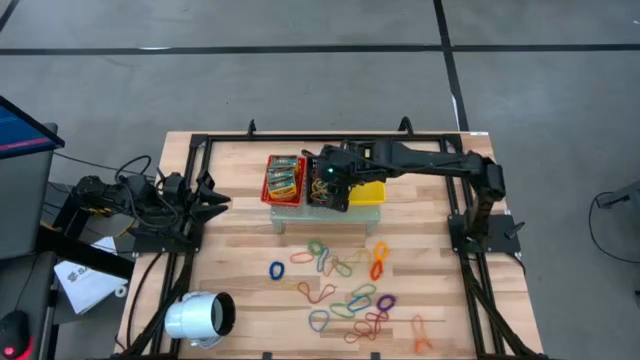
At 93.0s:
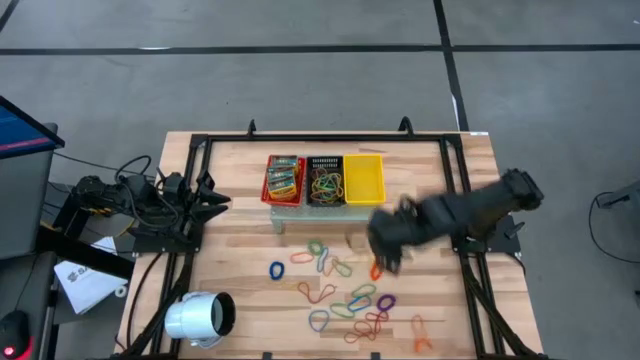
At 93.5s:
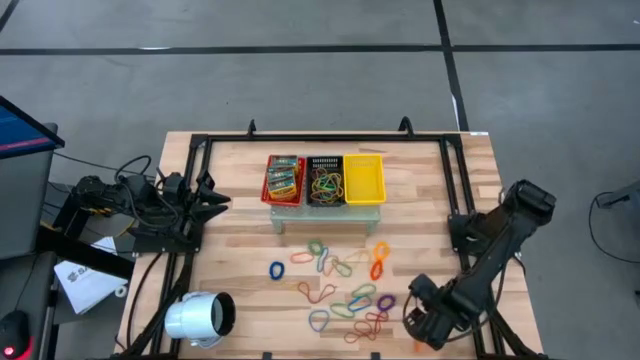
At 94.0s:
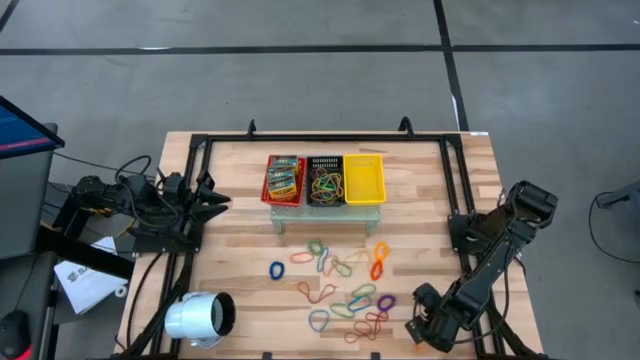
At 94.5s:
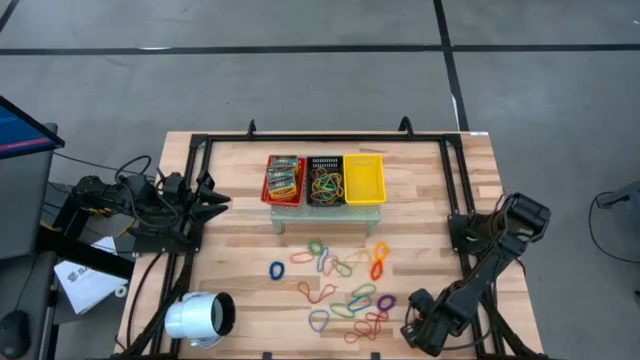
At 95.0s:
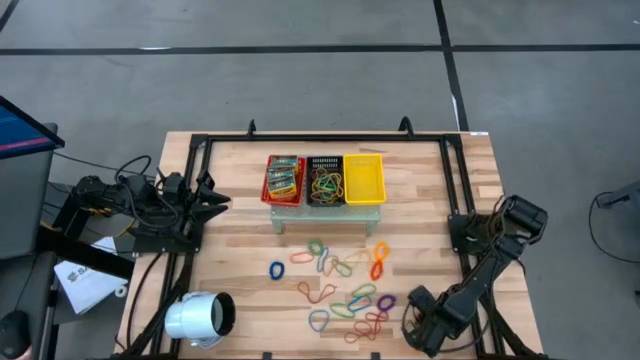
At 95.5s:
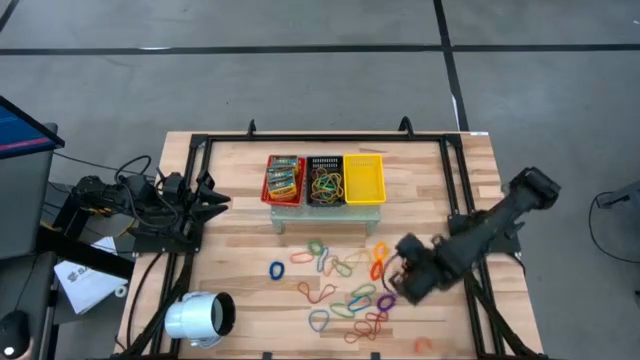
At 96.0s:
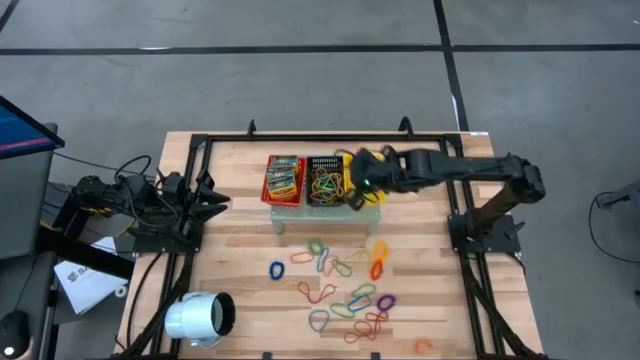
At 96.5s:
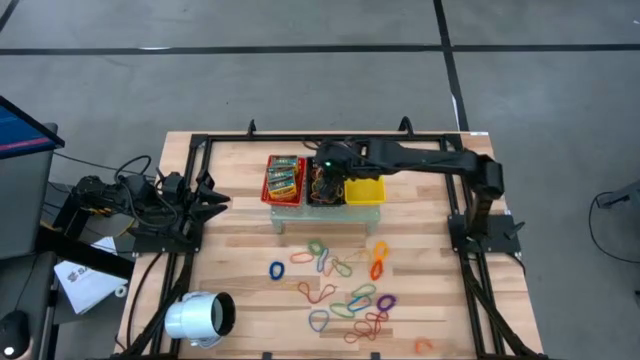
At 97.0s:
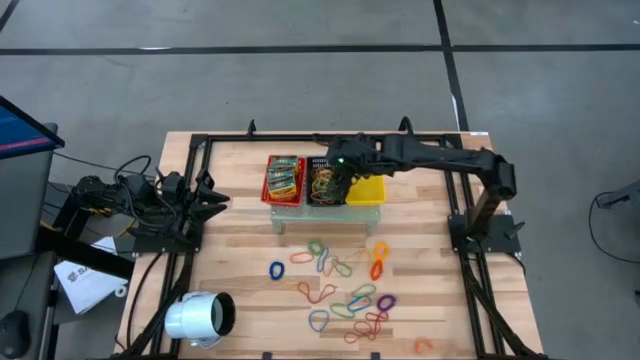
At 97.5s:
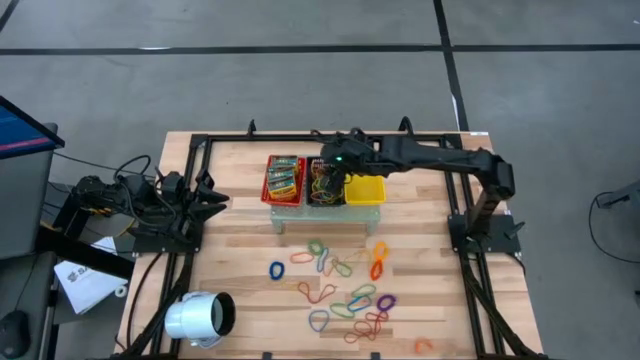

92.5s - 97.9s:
Task: Pick & Place Office Desk Supplies
Put the orange rubber band into the black bin on the shelf

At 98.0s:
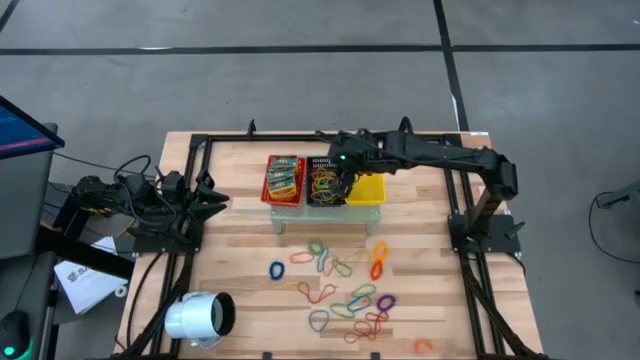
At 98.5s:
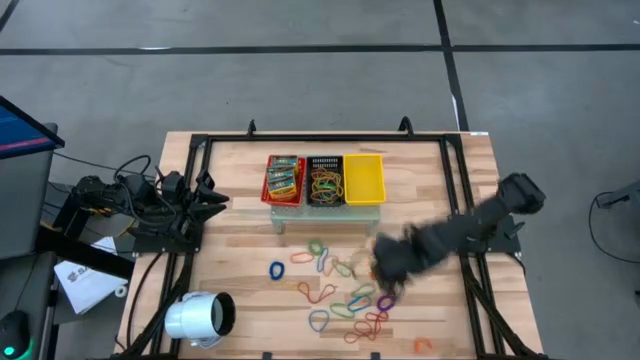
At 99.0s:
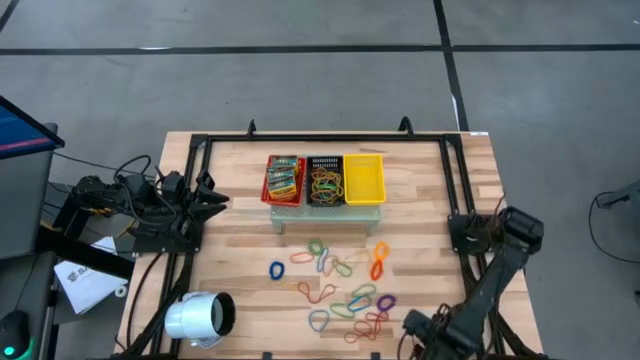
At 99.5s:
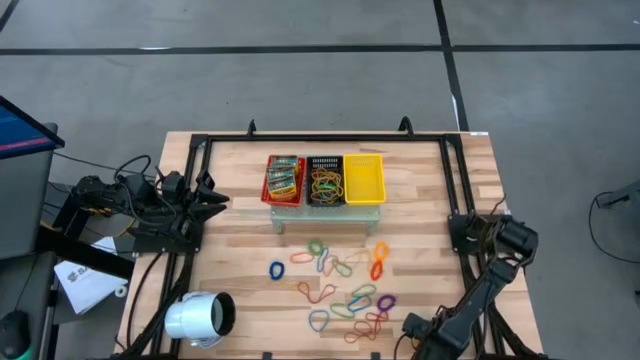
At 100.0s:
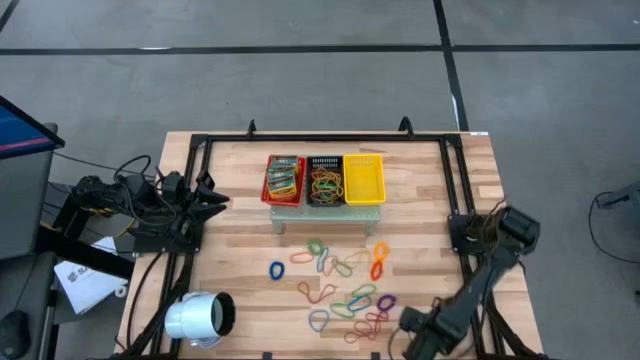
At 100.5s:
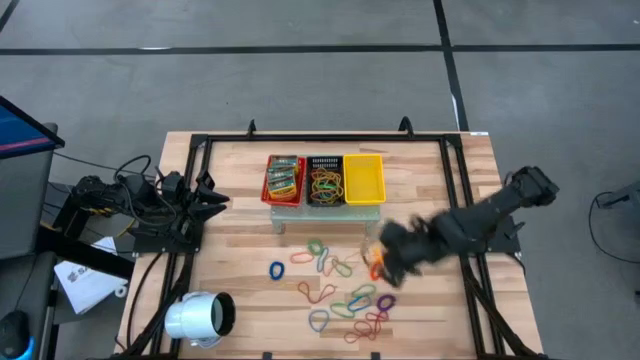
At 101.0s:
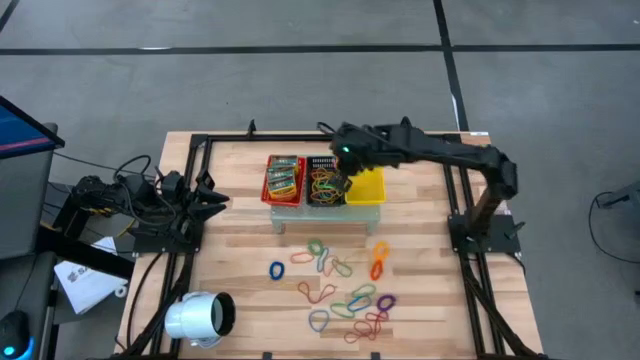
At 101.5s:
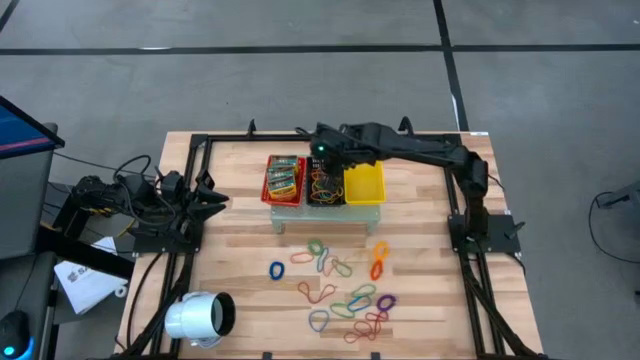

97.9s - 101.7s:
Put the orange rubber band into the black bin on the shelf

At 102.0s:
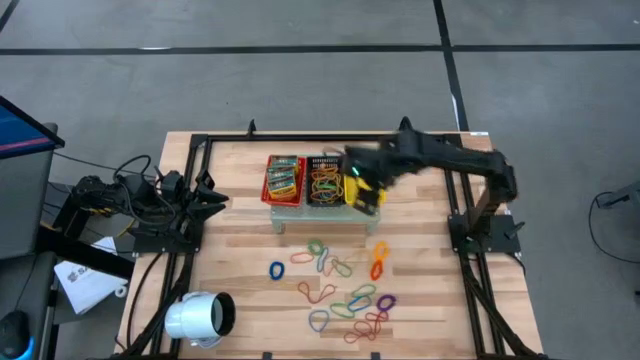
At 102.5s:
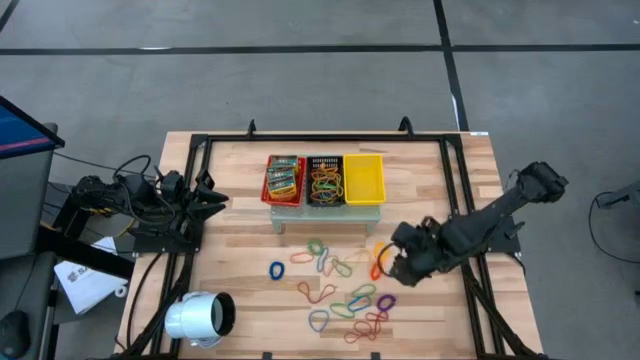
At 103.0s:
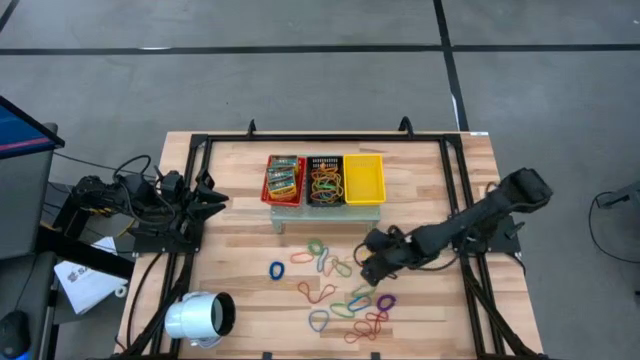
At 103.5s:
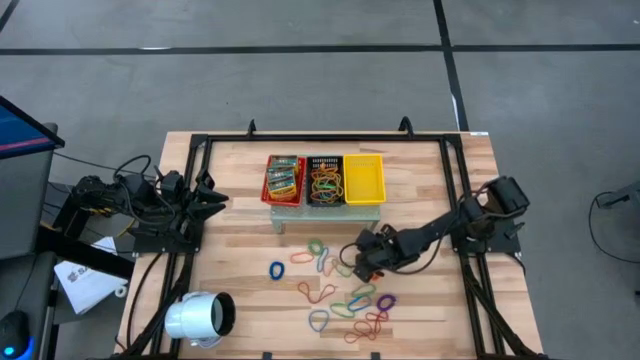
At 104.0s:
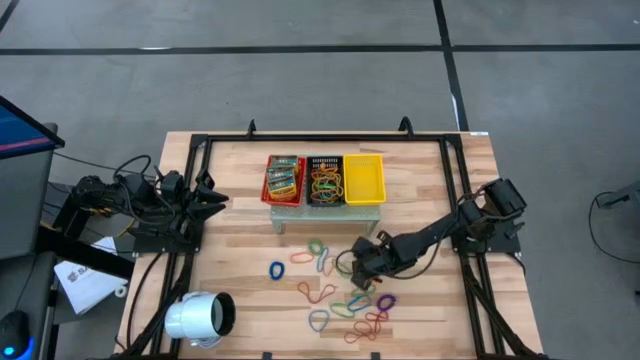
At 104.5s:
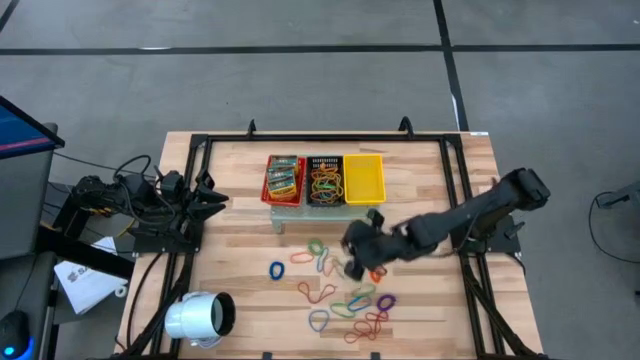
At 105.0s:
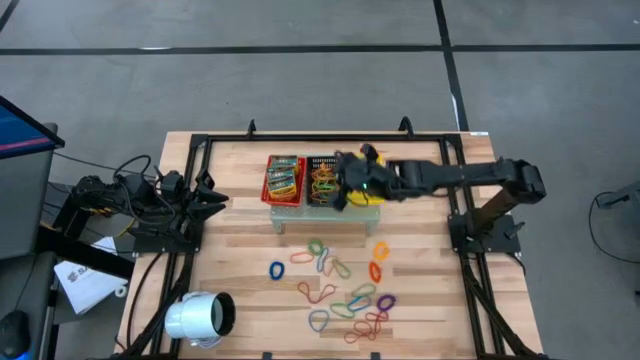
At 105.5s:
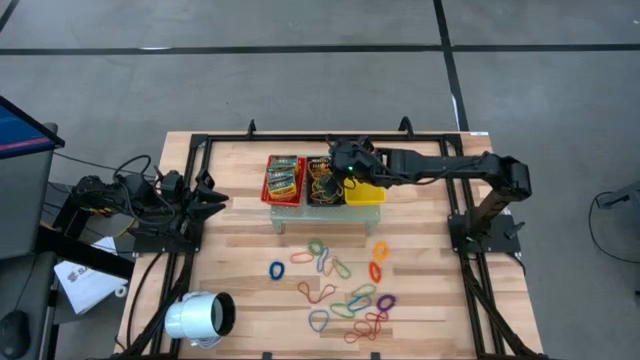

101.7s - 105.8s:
Put the yellow rubber band into the black bin on the shelf

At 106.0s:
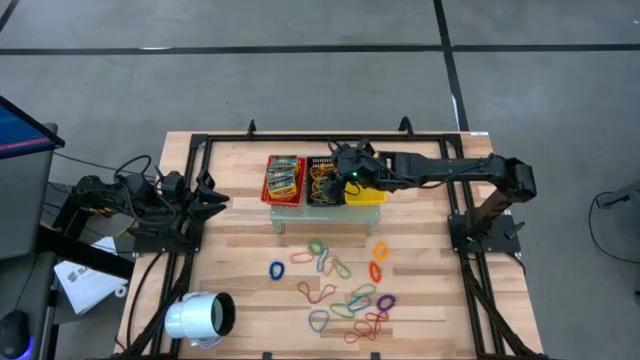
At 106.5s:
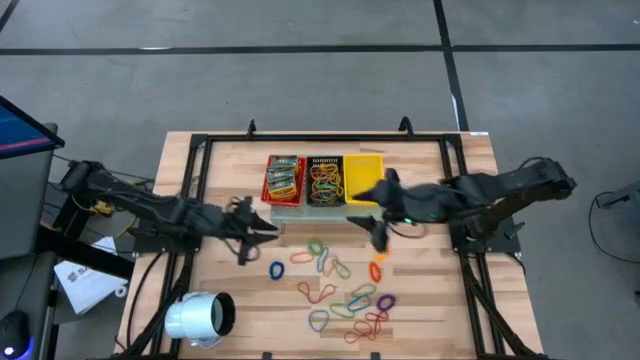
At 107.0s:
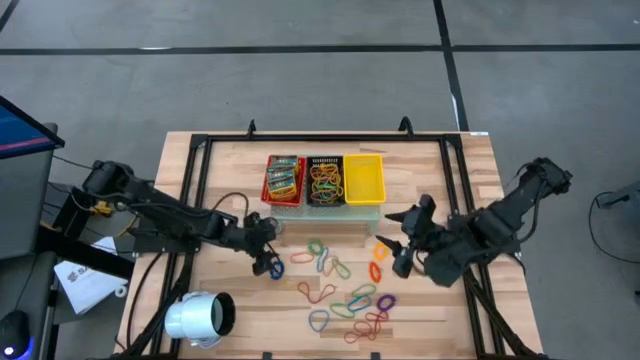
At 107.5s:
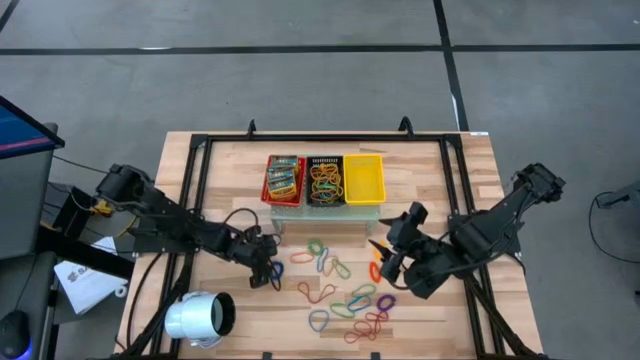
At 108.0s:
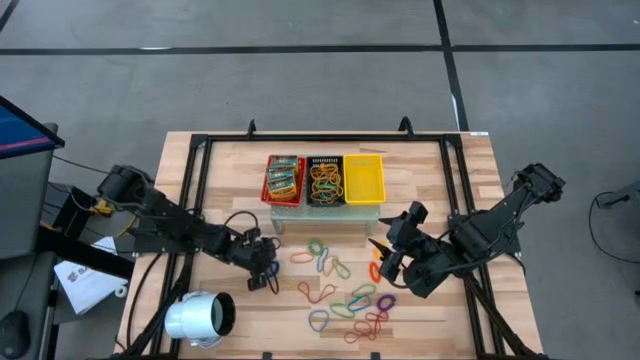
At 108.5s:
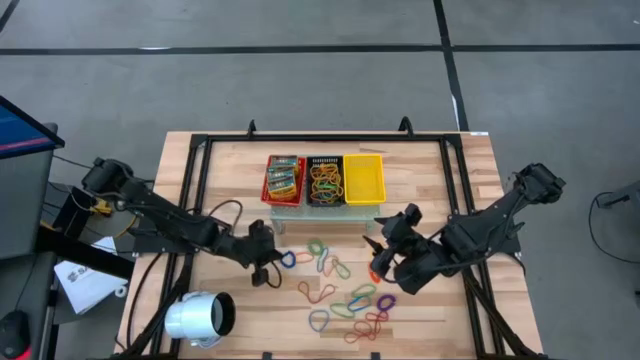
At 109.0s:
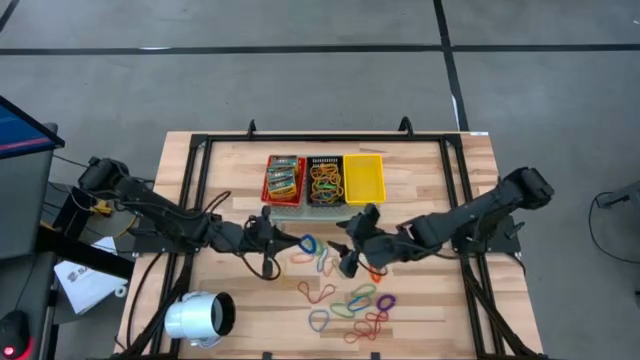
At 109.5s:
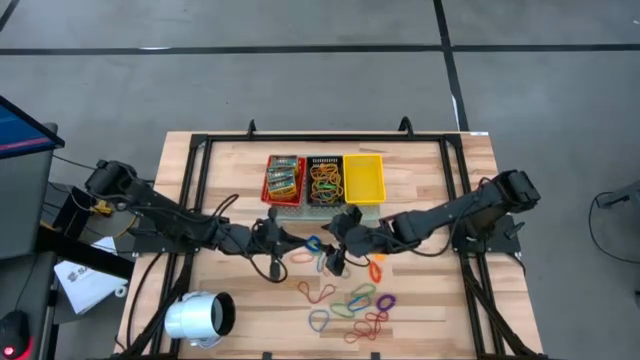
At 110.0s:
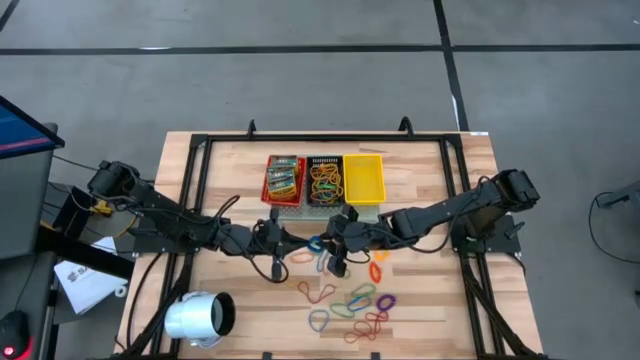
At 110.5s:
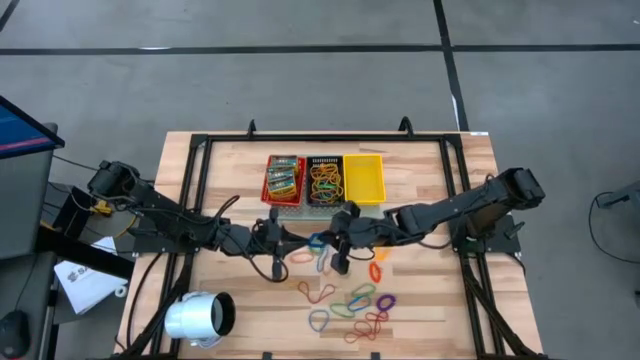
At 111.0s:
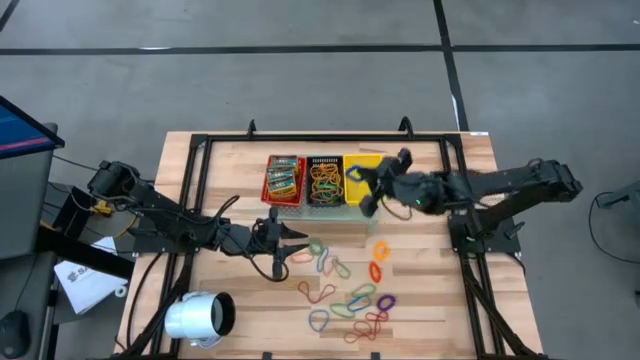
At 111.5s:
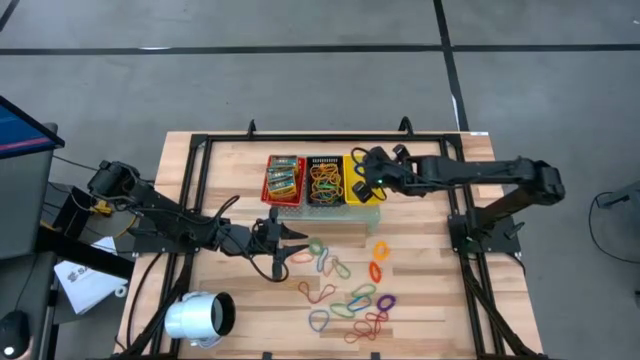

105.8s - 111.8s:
Put the blue spring keychain into the yellow bin on the shelf

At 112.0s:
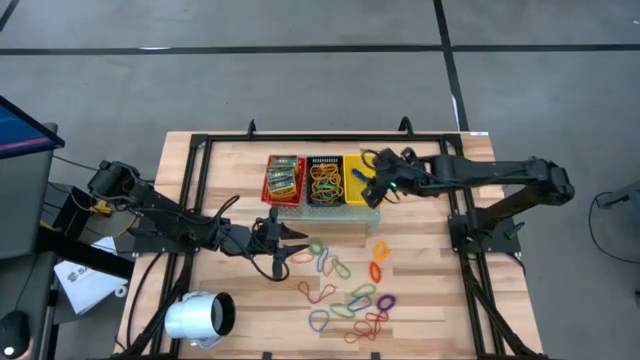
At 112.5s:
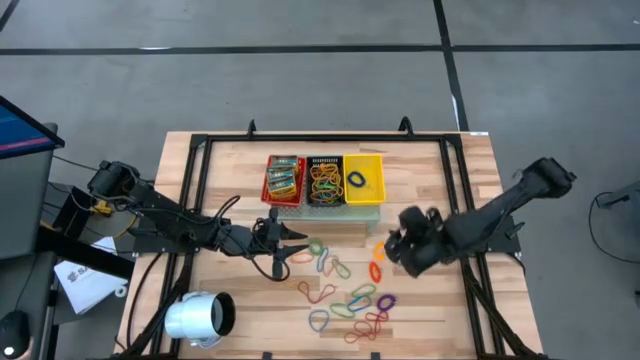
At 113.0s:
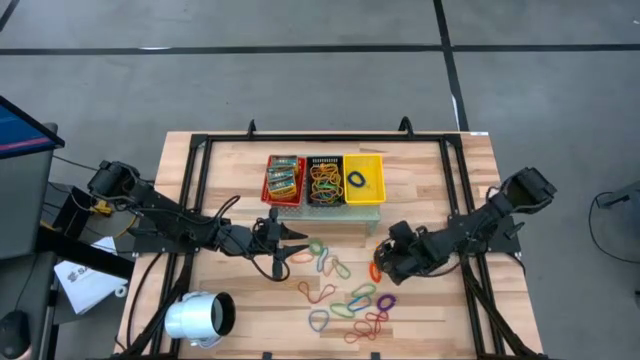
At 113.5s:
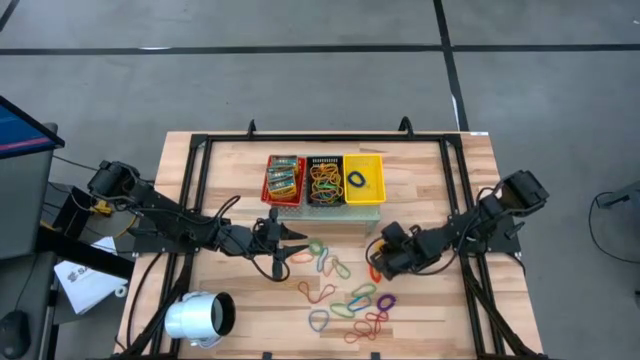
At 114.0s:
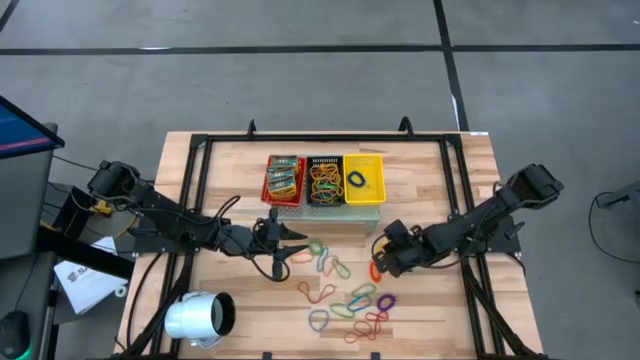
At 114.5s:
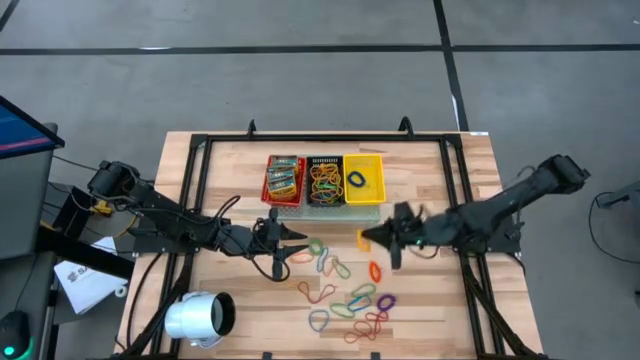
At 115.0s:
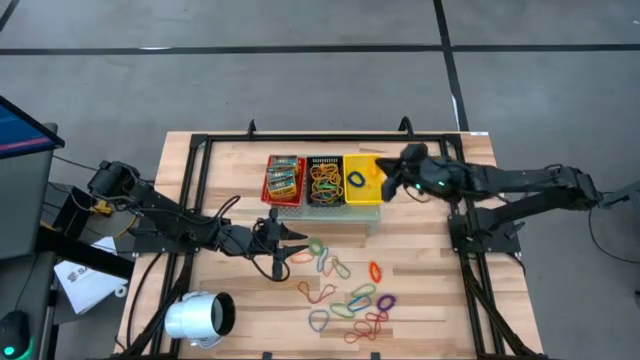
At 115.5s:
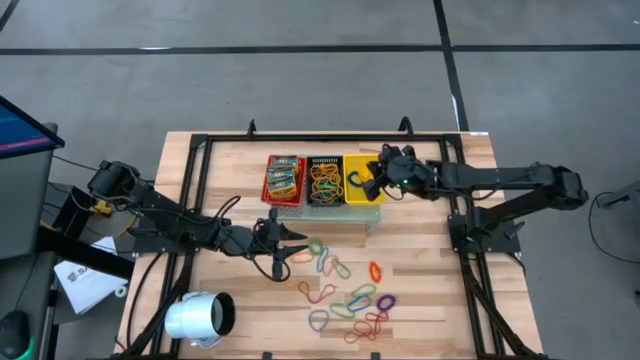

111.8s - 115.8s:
Put the yellow spring keychain into the yellow bin on the shelf
